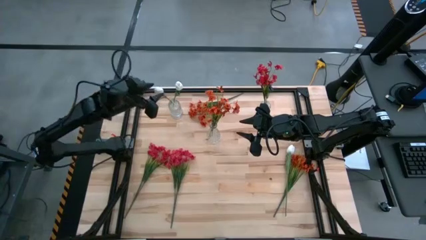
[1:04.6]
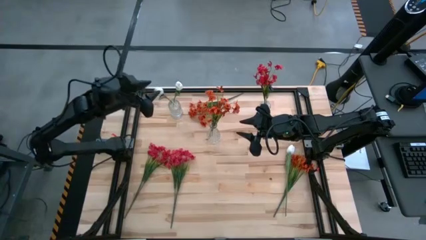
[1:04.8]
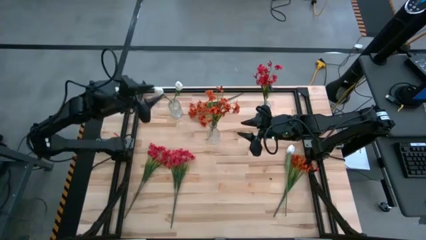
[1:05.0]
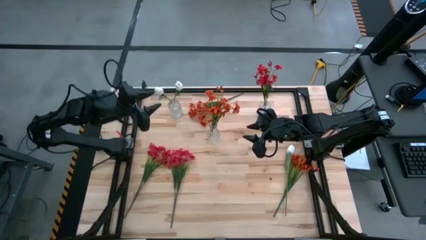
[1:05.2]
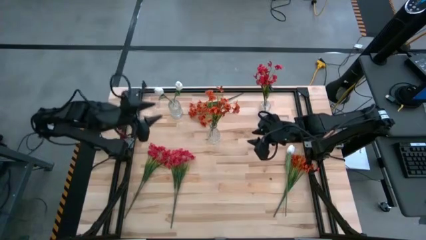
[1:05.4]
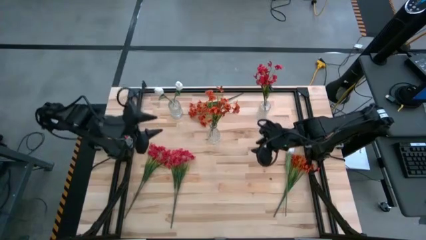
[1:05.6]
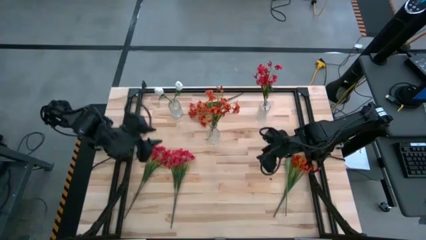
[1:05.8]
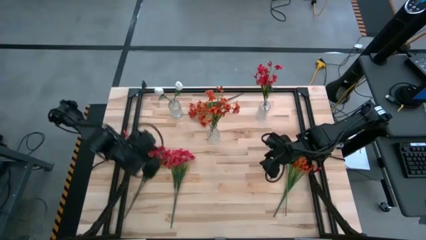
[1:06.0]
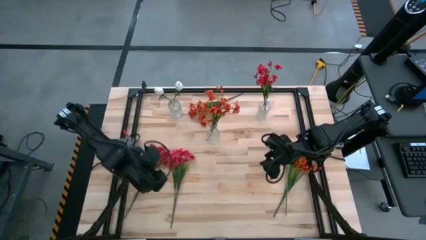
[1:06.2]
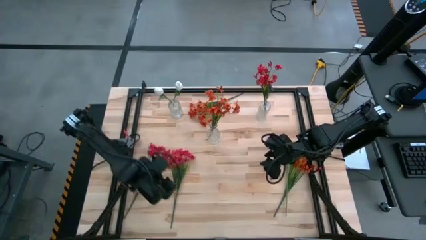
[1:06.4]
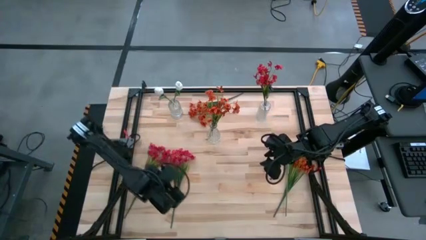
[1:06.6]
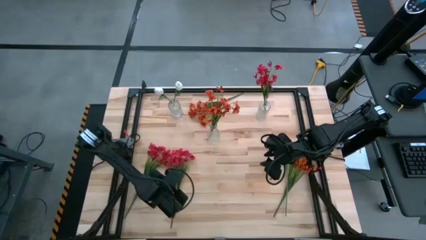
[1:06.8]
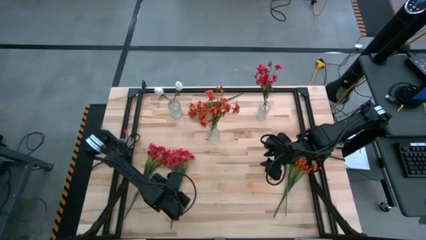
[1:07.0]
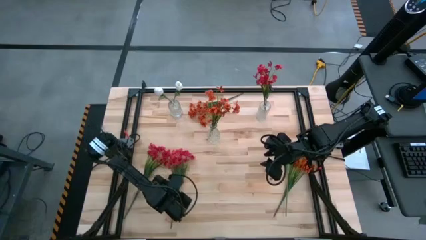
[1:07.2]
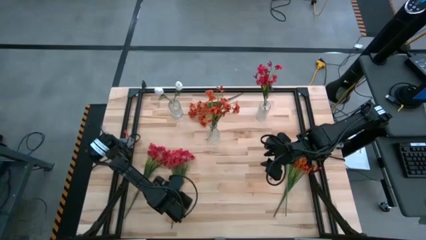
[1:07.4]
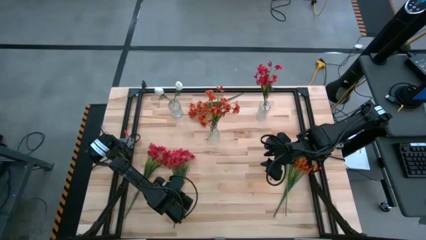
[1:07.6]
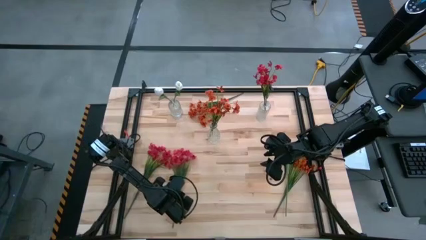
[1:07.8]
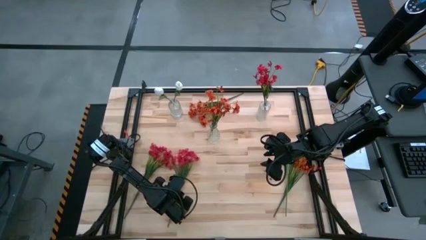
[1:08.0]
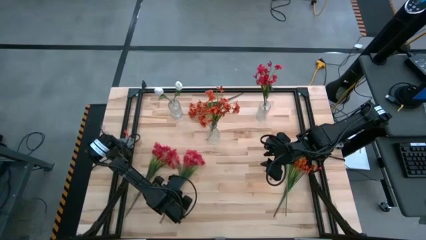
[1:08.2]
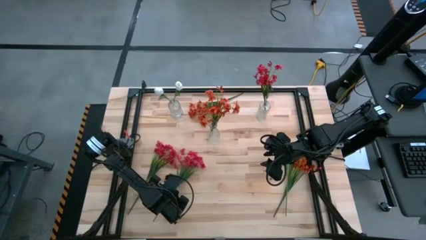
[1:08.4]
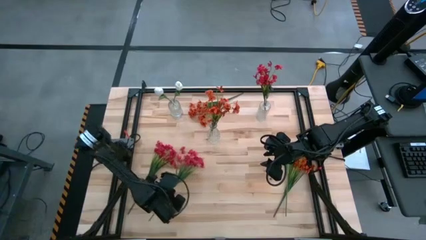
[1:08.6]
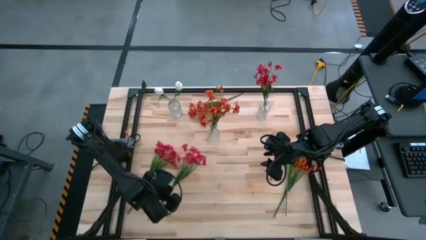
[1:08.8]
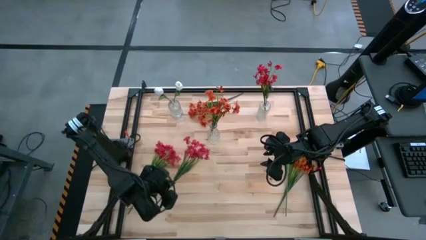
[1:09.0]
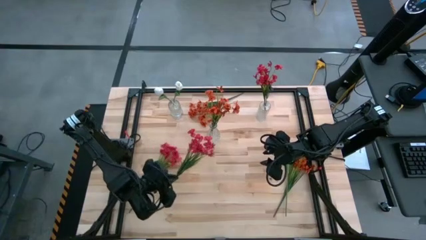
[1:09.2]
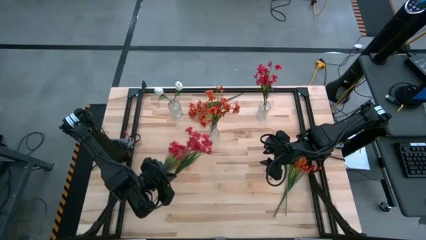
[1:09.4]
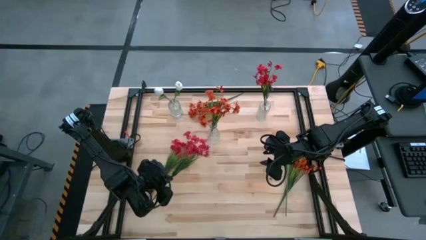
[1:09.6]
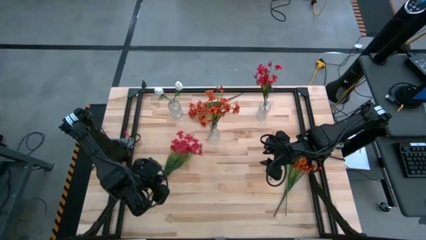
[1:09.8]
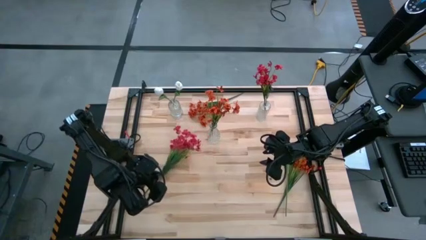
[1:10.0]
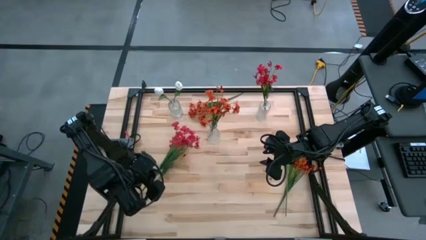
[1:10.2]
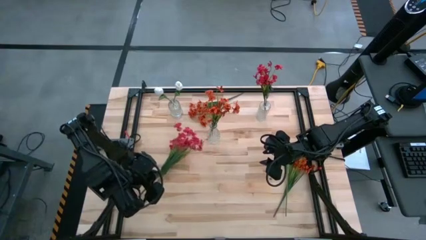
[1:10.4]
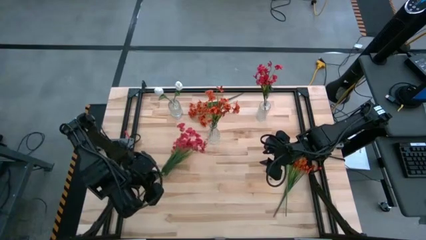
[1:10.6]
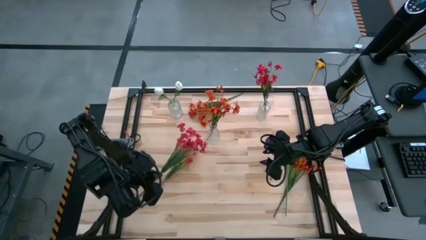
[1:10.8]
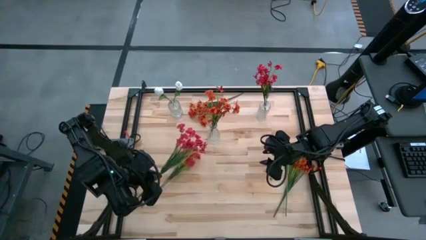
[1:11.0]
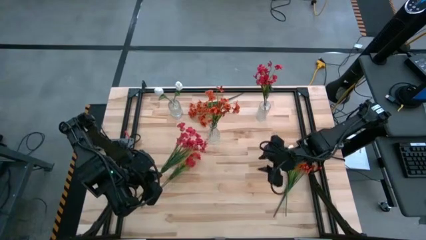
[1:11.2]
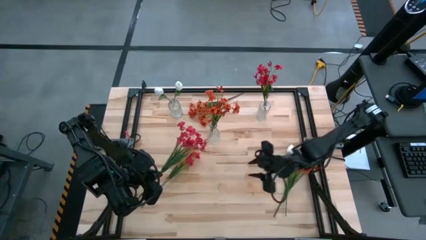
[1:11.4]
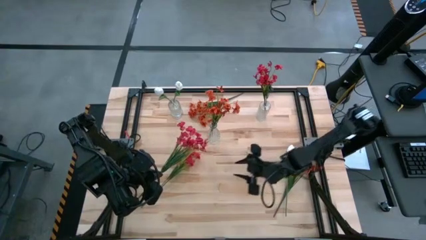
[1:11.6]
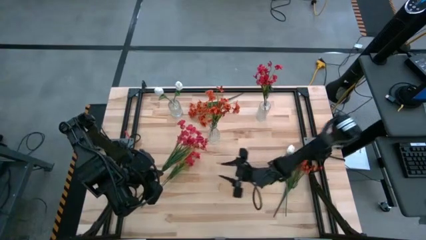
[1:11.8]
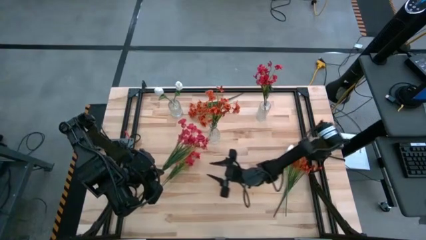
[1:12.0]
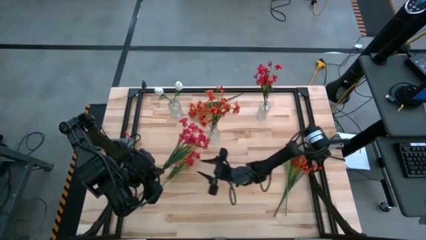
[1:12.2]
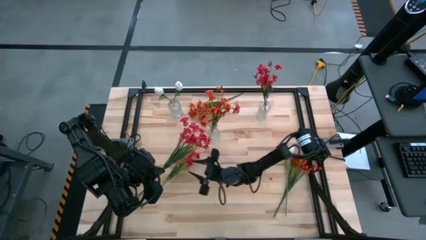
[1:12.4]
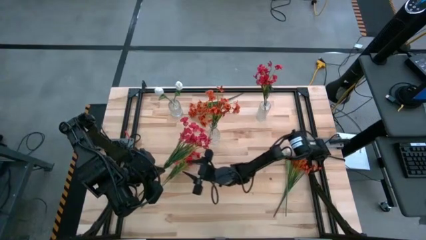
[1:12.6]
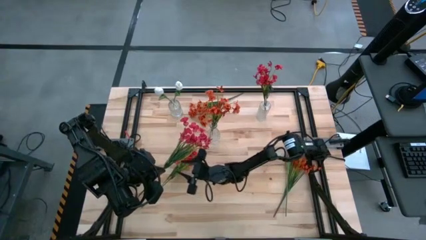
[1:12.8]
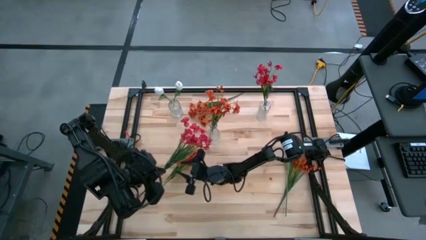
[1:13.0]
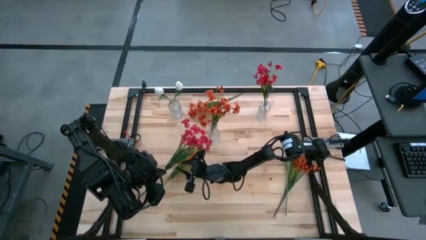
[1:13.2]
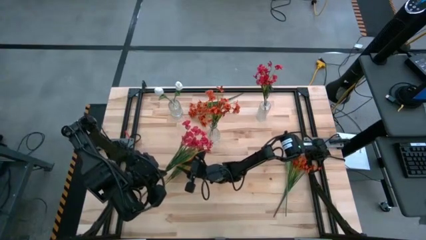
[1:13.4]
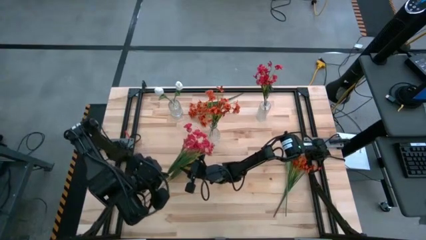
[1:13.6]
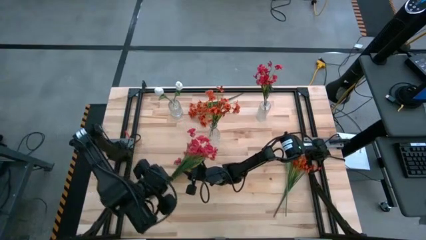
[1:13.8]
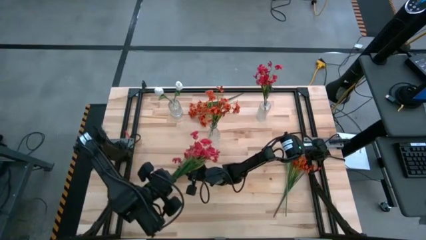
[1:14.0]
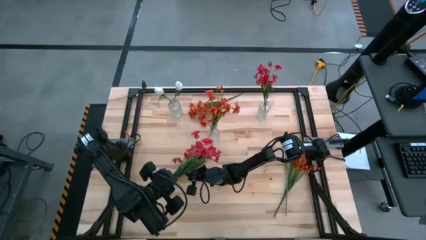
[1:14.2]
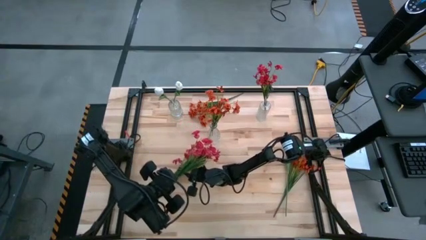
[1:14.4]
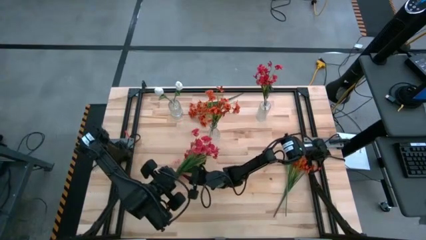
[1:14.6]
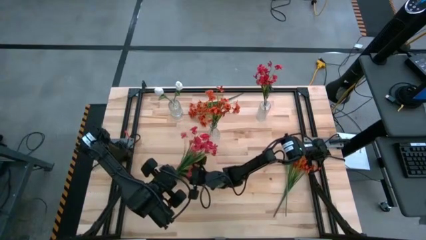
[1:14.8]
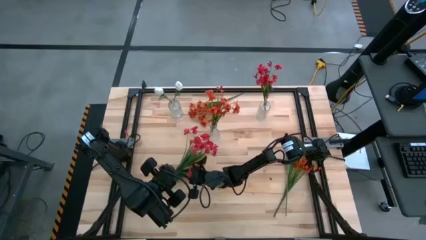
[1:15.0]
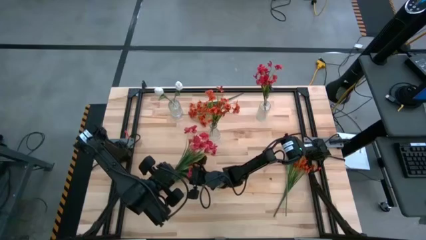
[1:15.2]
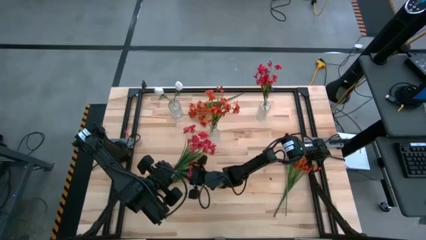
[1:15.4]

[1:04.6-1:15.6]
Task: Sort flowers into vase by color
Put the right red flowers into the top right transparent vase

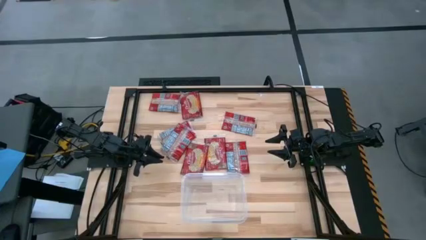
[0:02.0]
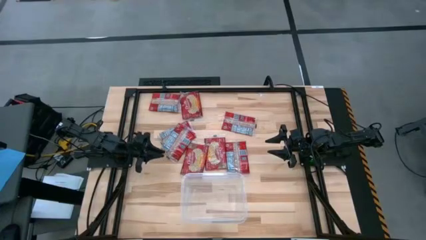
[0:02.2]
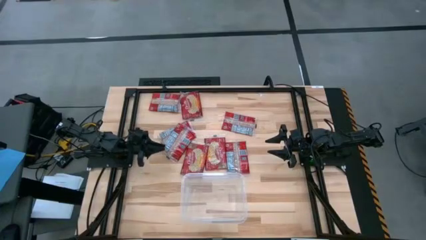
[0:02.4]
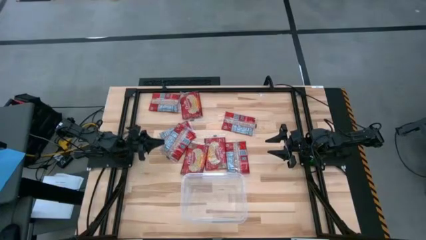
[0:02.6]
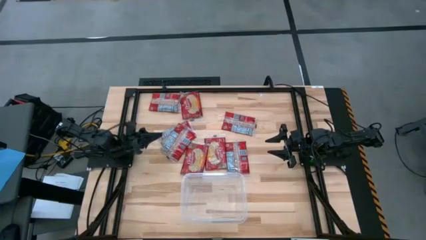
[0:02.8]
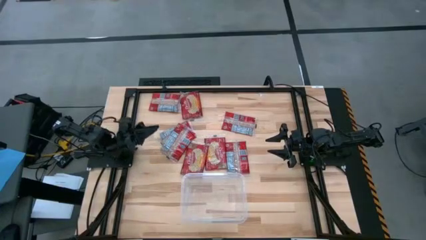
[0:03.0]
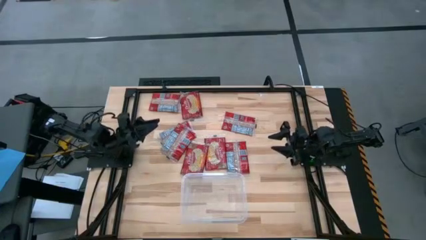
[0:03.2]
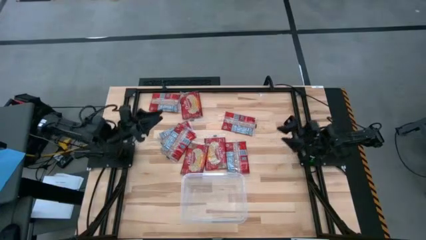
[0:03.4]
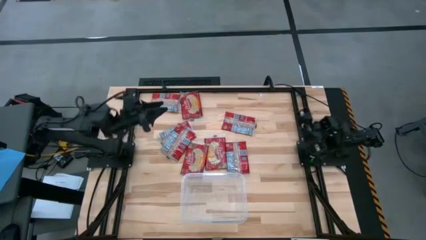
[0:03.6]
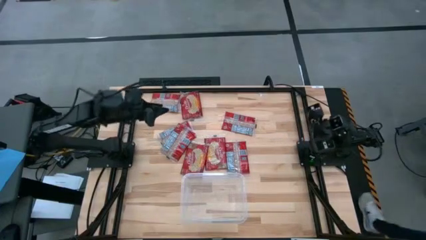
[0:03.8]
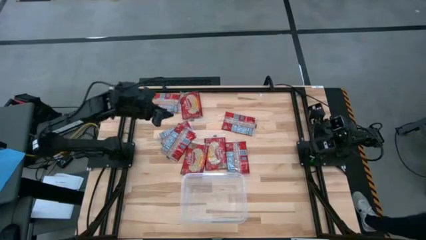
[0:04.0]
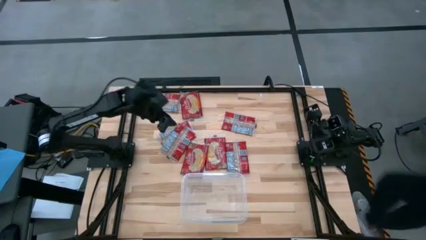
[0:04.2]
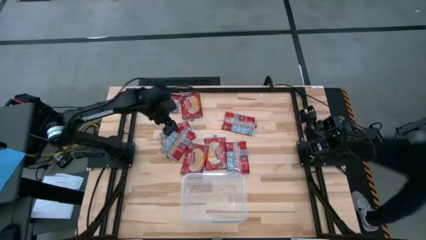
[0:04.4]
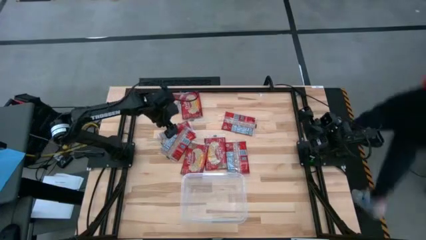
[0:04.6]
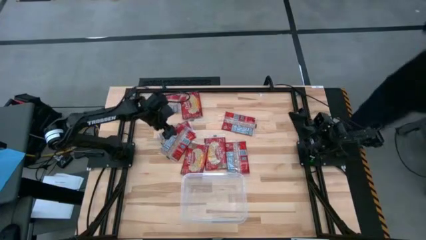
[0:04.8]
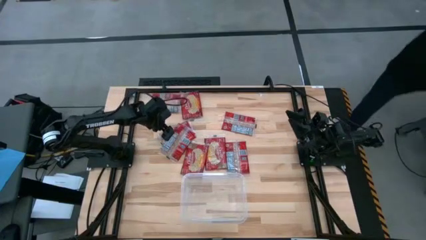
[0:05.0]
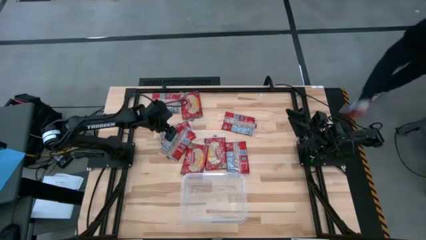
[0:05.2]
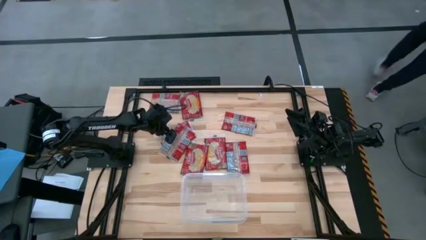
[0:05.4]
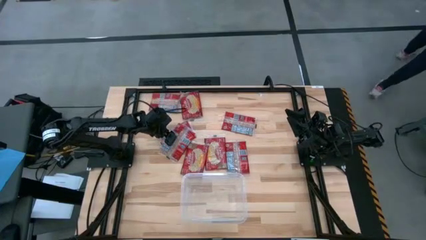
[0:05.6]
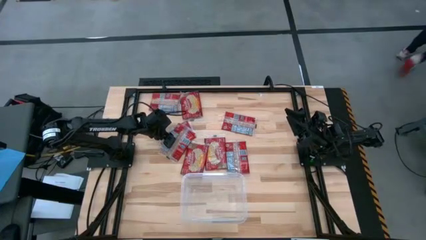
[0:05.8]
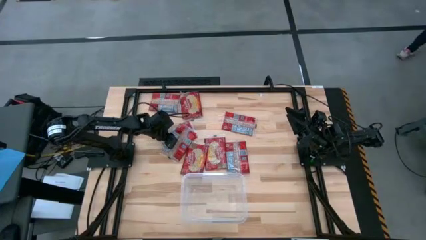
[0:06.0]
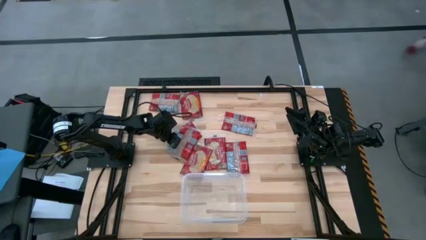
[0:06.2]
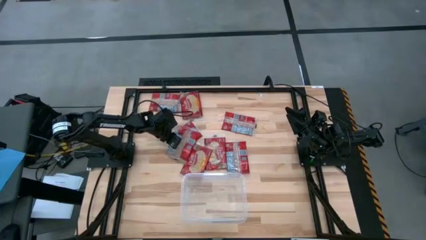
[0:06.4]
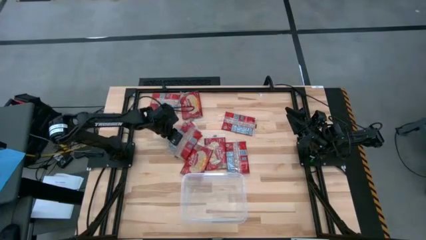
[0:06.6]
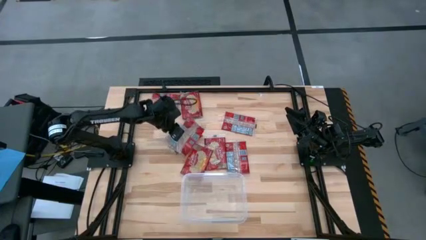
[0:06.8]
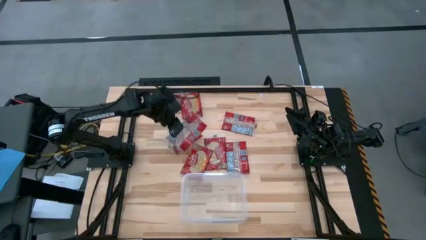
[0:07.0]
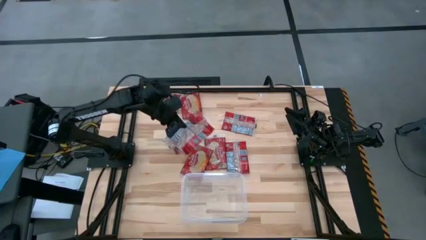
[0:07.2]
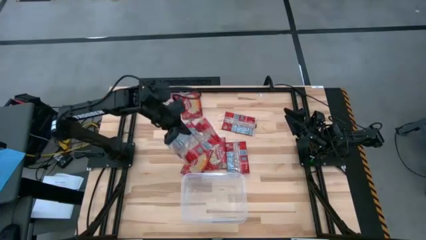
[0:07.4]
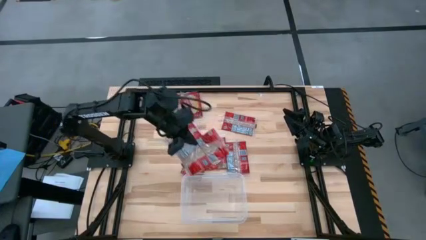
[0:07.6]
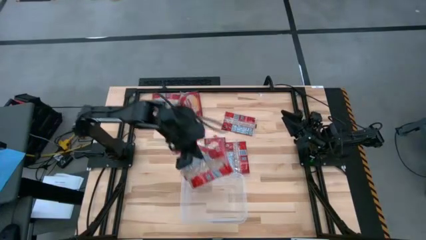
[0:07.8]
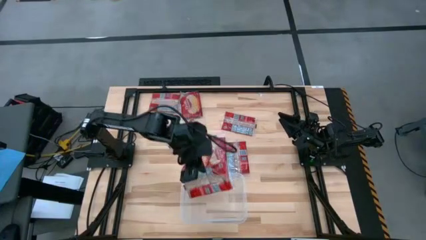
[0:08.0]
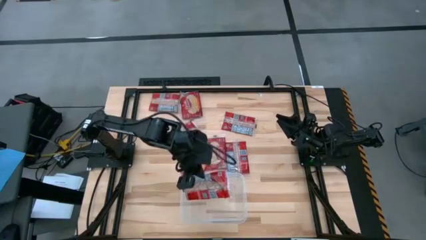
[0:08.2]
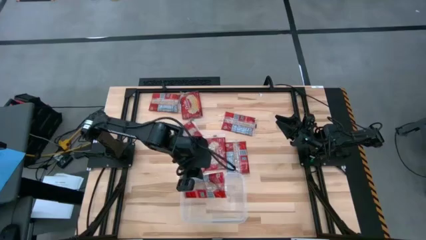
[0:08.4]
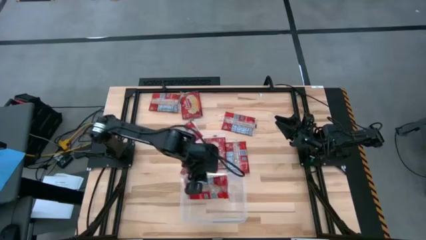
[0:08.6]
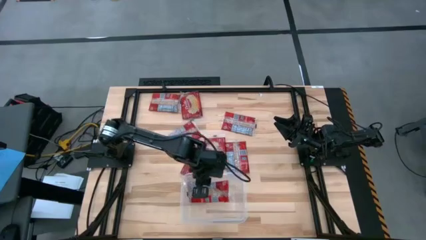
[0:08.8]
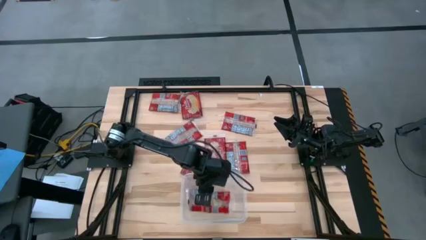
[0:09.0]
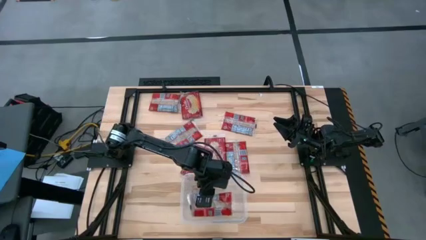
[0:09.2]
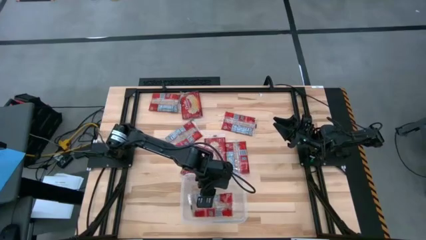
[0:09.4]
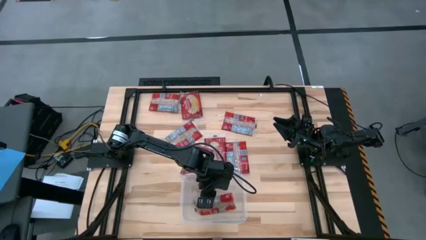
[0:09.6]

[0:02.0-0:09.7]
Task: Sort popcorn bags into baskets
Put the red popcorn bag into the transparent container
